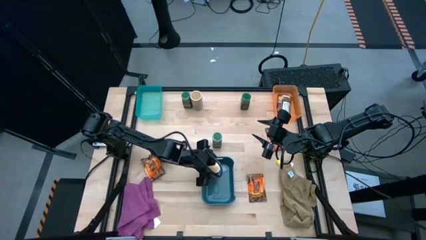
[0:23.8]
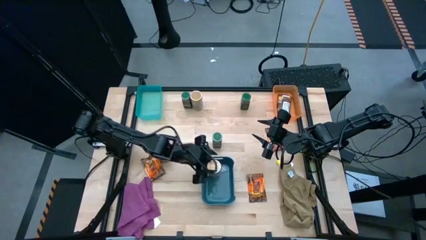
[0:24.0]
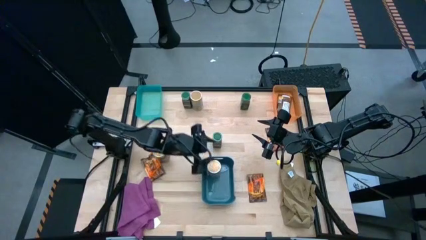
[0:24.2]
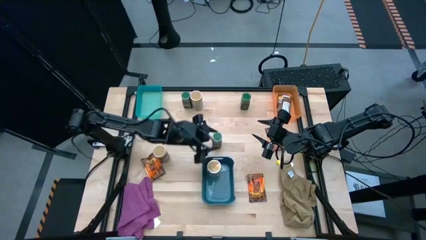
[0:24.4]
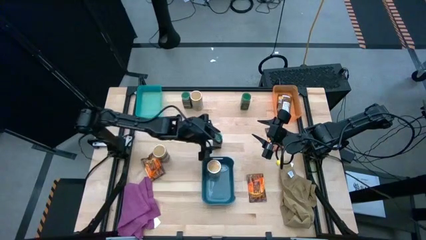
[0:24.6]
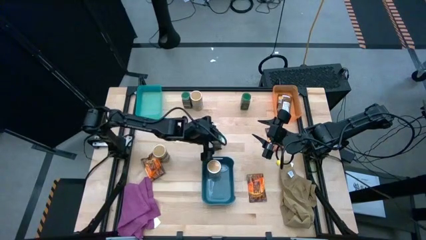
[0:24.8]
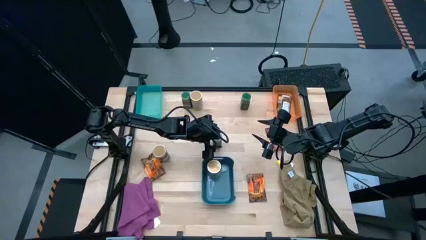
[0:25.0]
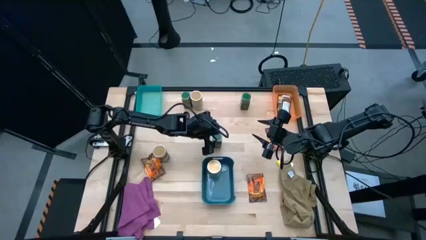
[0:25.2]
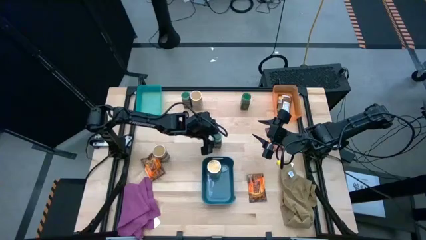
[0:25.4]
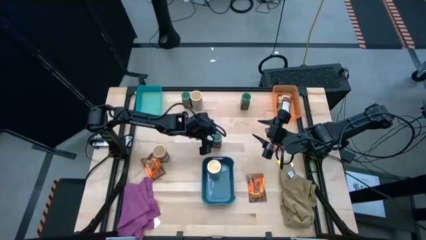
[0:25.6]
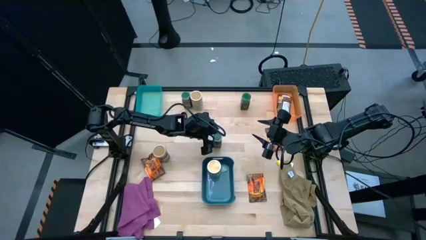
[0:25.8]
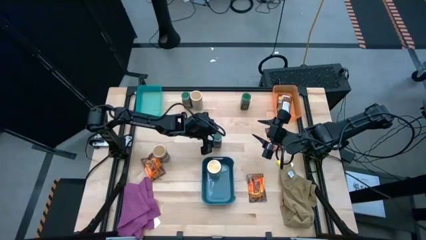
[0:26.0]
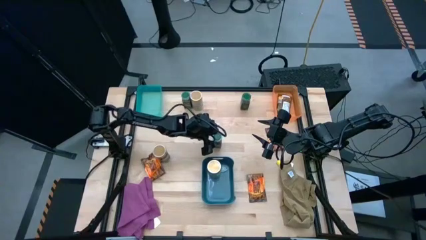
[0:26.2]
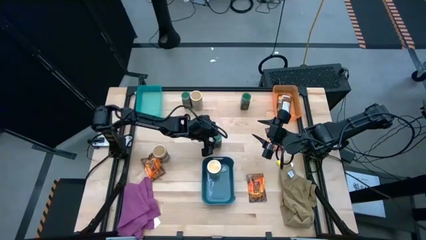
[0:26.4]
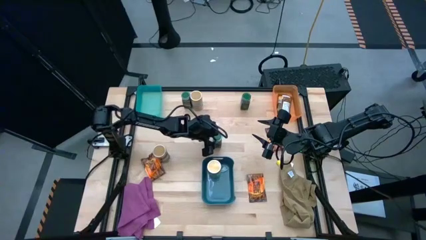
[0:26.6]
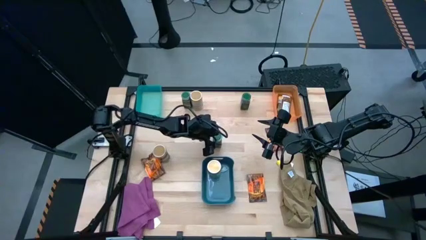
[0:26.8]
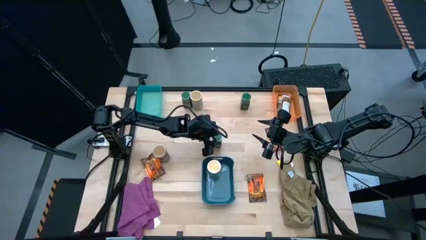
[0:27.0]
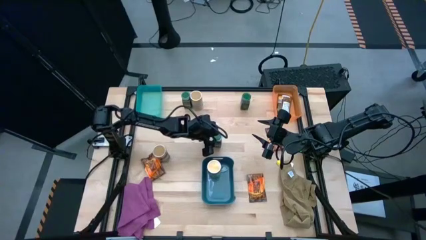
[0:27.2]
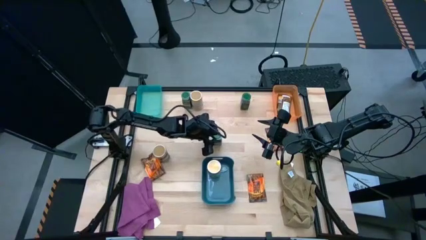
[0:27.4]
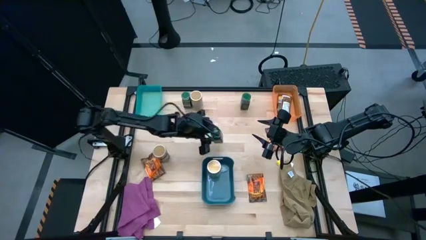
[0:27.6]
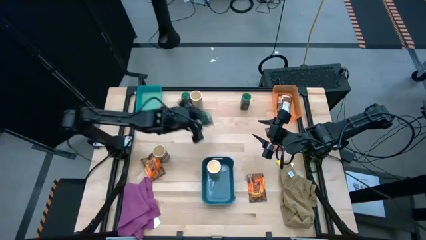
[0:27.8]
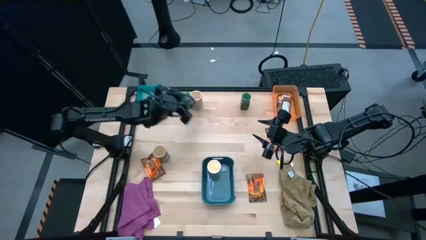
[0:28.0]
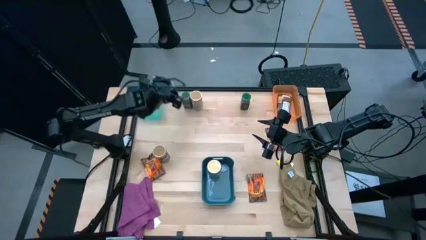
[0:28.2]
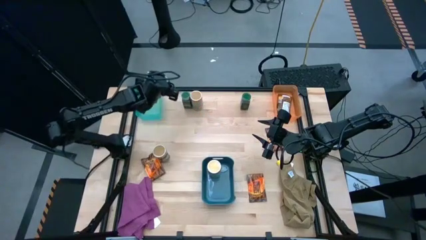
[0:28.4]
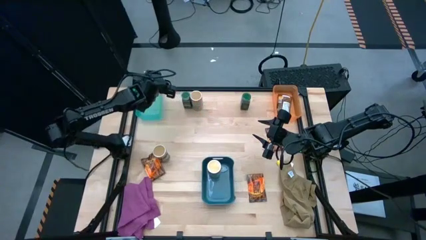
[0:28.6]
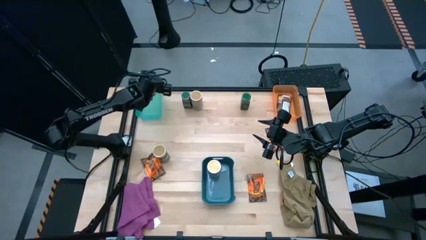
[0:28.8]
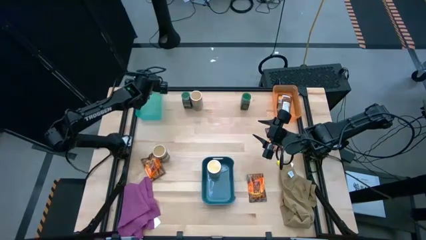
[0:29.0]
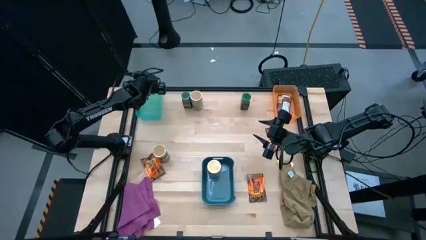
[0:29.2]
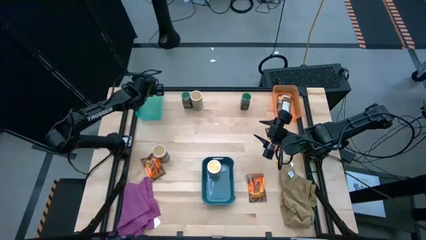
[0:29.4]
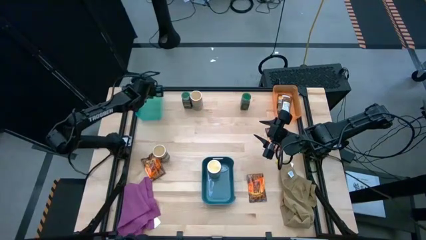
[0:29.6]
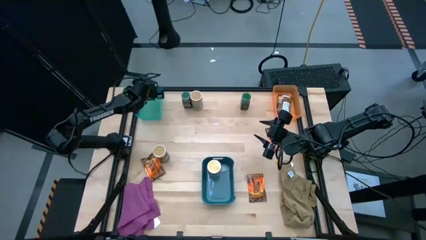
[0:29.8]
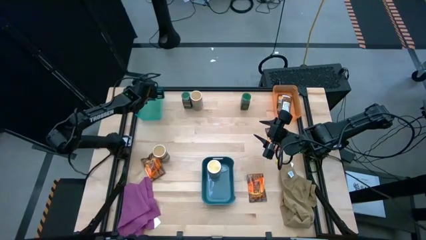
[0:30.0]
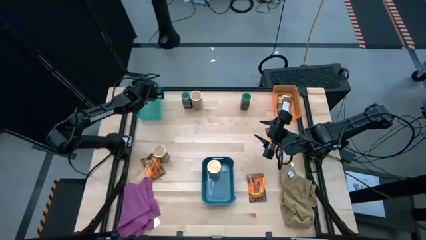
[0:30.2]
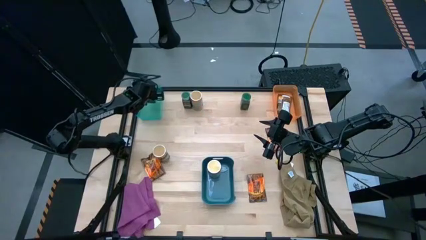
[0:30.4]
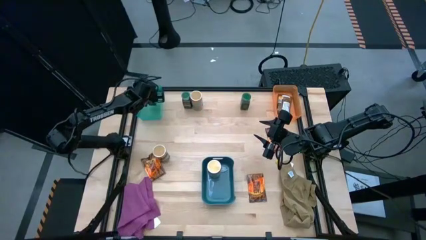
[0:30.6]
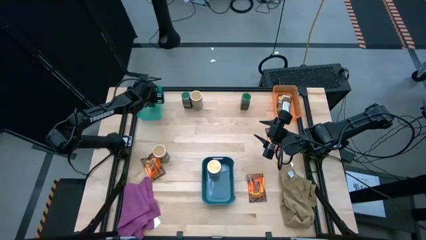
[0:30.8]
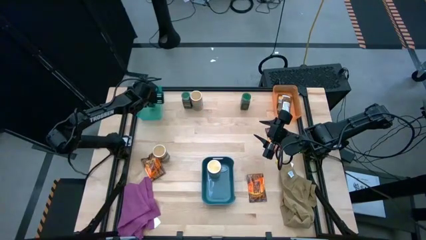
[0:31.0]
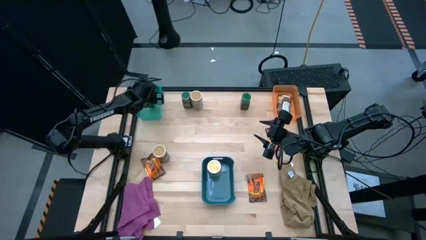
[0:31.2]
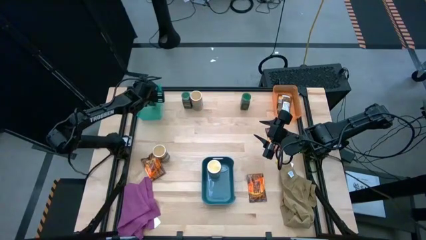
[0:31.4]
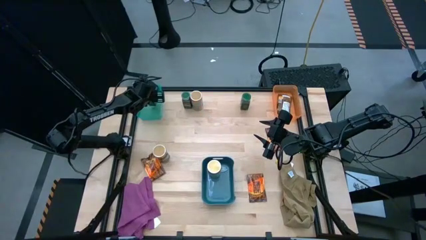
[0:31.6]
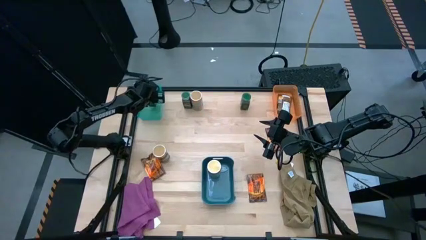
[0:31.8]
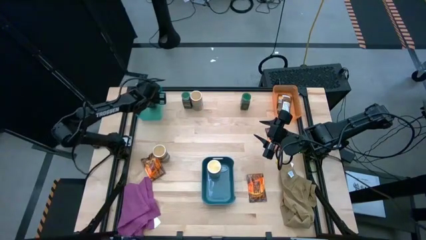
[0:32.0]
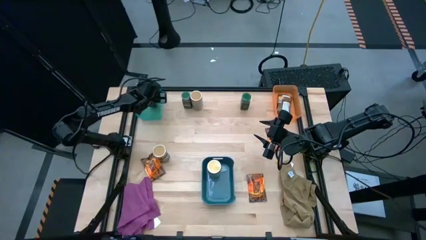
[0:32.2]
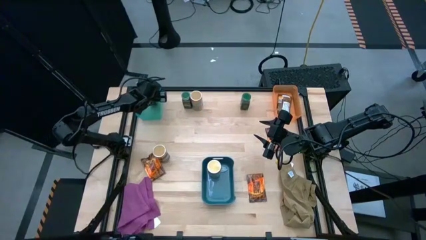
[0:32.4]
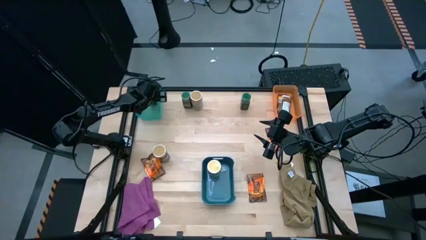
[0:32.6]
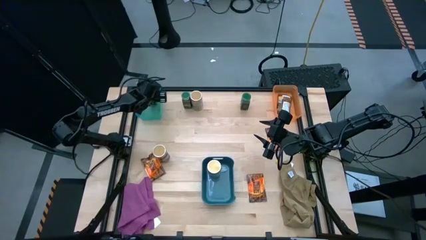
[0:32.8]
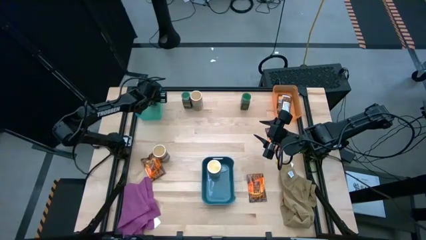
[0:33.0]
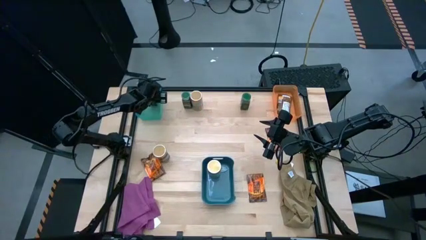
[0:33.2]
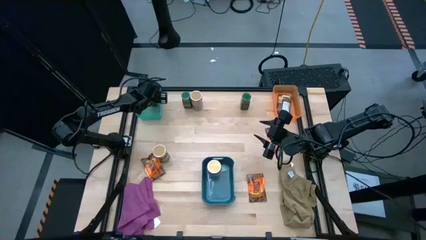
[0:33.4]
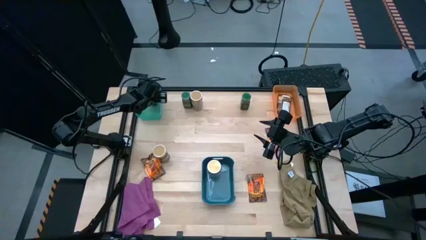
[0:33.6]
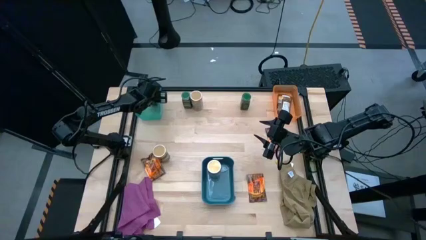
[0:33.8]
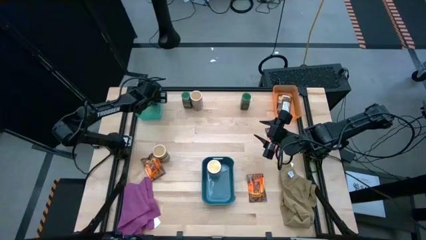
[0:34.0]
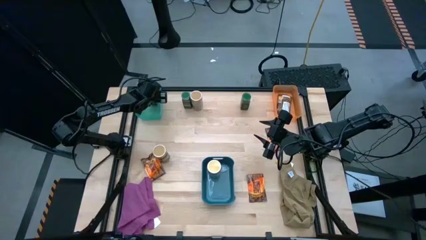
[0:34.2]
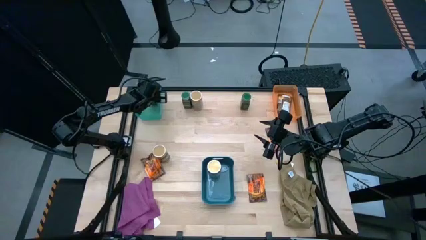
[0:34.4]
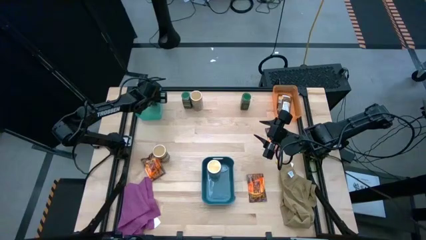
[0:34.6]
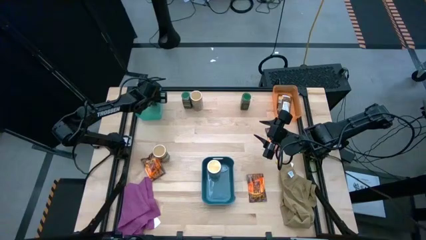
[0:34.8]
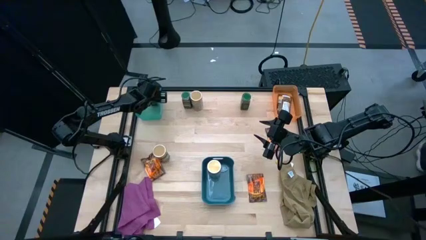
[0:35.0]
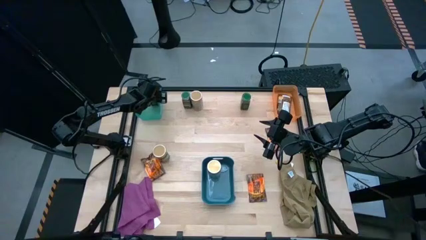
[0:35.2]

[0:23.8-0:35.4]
Task: Sort spices by type
Put the green seasoning bottle into the light blue bin
